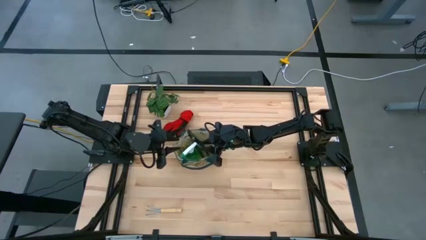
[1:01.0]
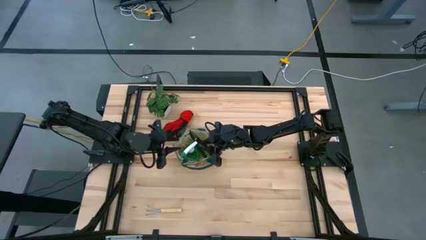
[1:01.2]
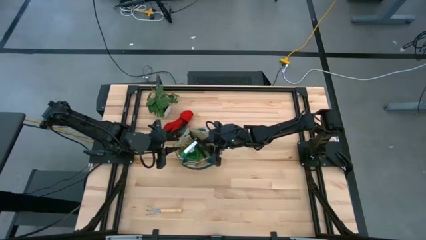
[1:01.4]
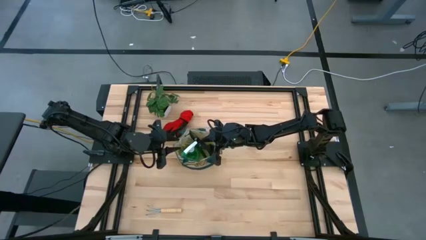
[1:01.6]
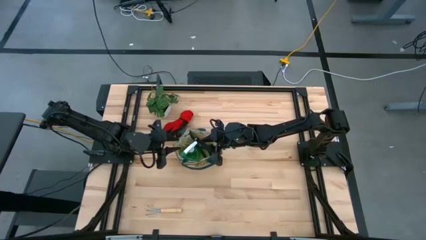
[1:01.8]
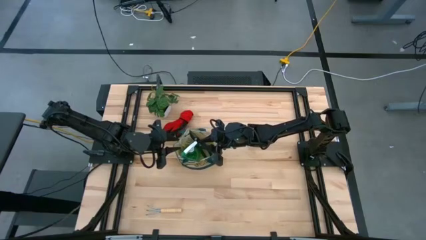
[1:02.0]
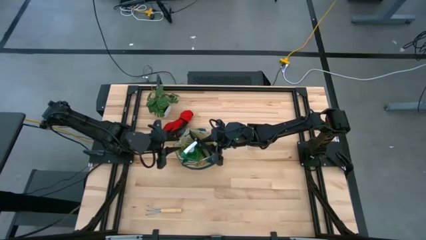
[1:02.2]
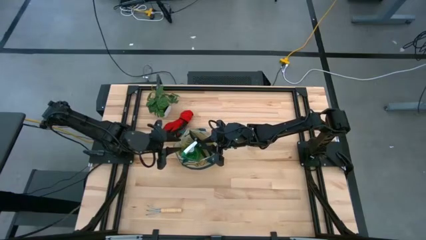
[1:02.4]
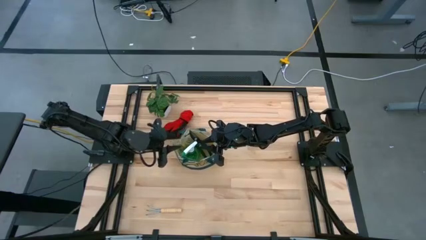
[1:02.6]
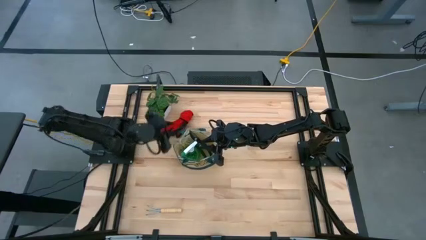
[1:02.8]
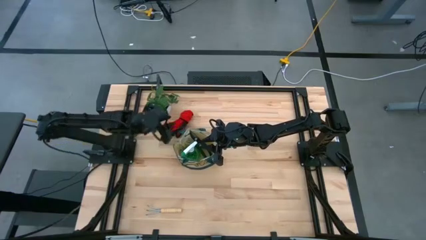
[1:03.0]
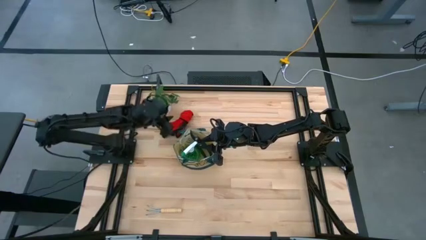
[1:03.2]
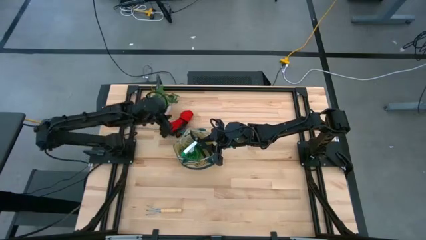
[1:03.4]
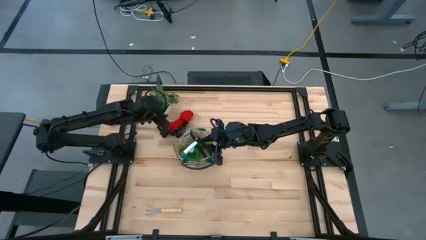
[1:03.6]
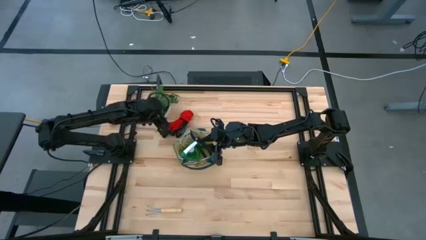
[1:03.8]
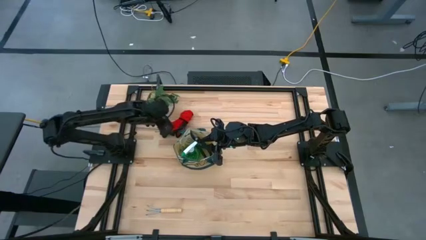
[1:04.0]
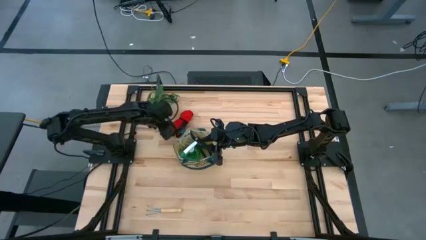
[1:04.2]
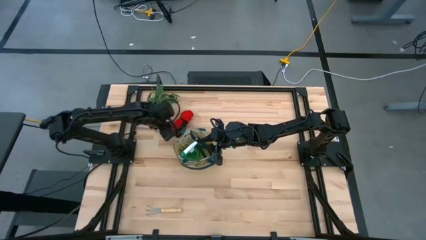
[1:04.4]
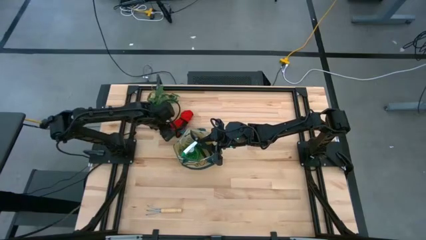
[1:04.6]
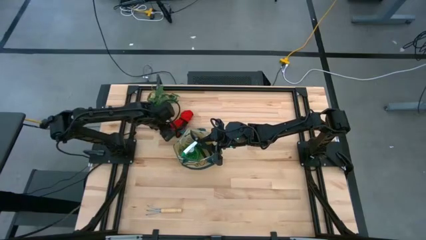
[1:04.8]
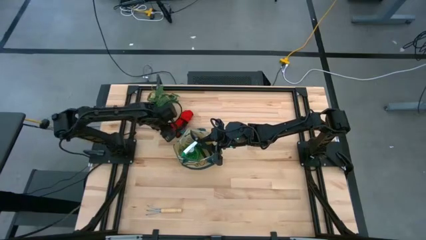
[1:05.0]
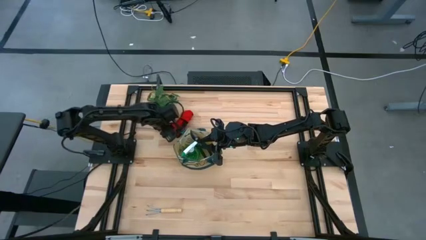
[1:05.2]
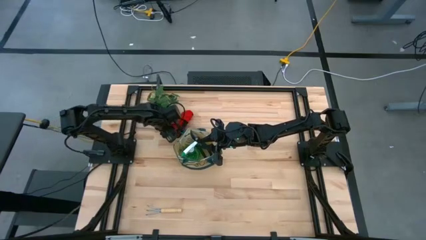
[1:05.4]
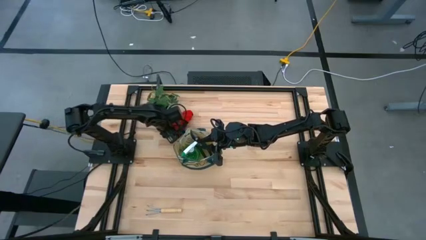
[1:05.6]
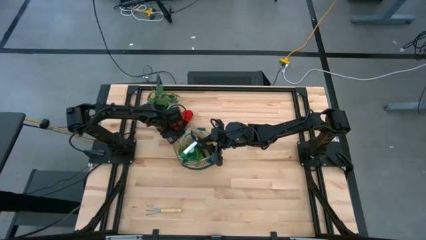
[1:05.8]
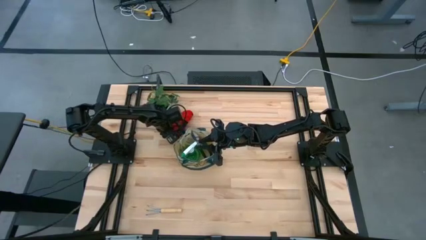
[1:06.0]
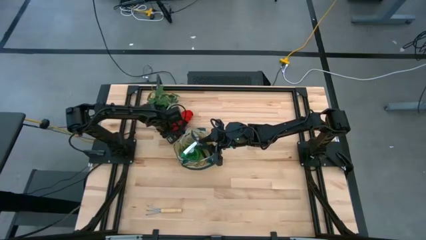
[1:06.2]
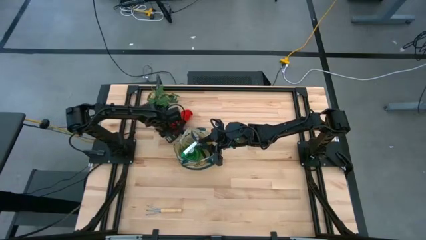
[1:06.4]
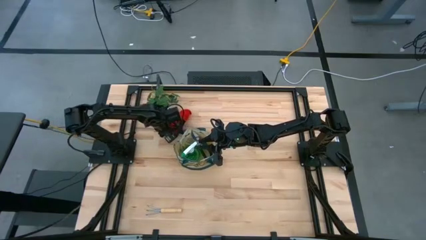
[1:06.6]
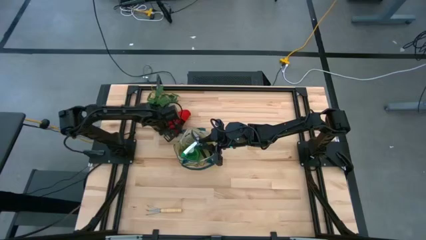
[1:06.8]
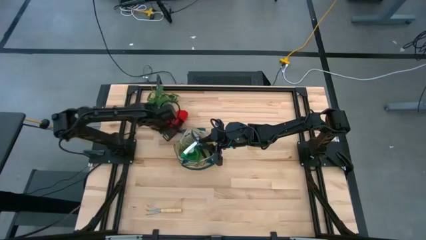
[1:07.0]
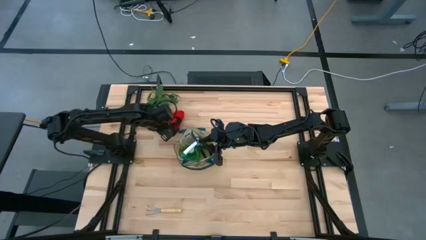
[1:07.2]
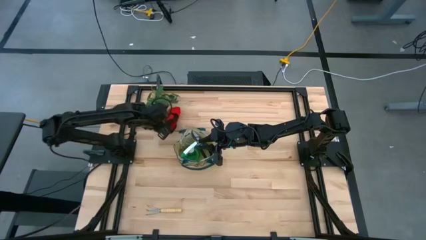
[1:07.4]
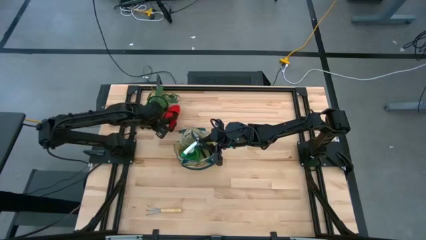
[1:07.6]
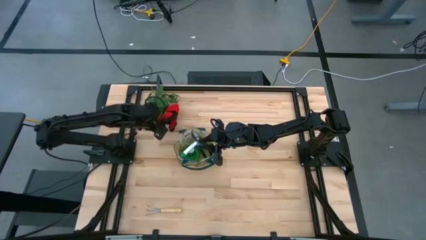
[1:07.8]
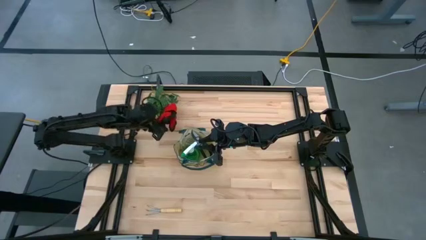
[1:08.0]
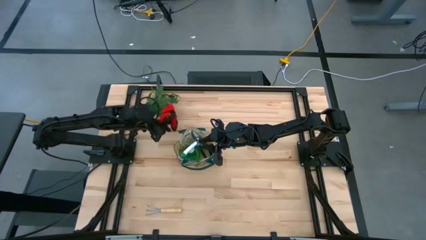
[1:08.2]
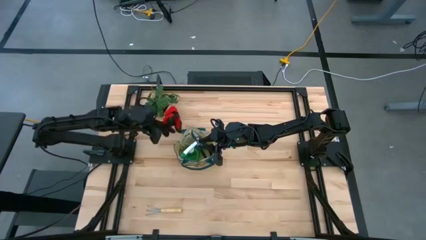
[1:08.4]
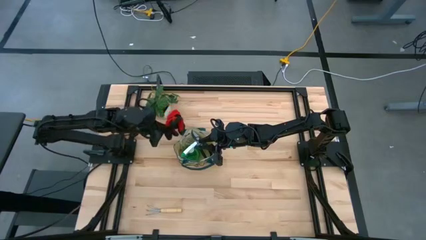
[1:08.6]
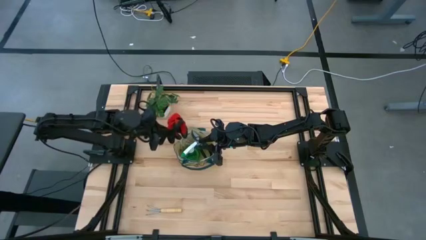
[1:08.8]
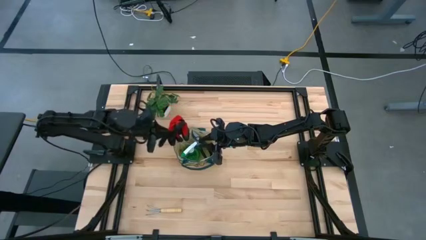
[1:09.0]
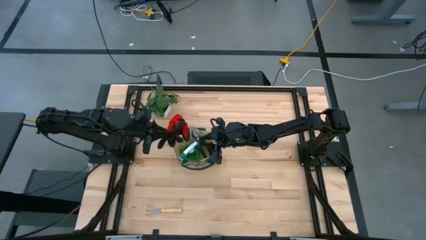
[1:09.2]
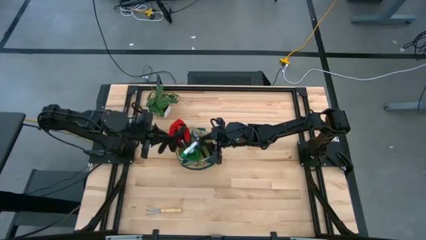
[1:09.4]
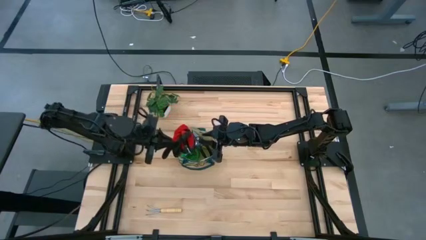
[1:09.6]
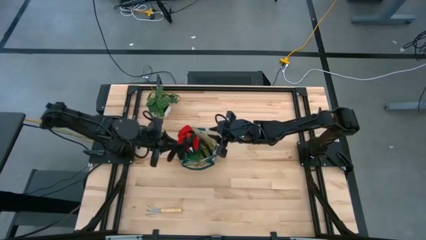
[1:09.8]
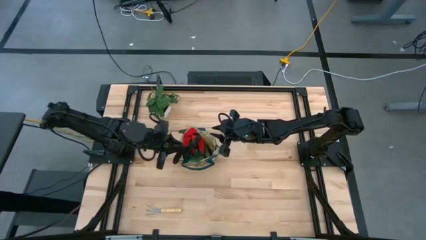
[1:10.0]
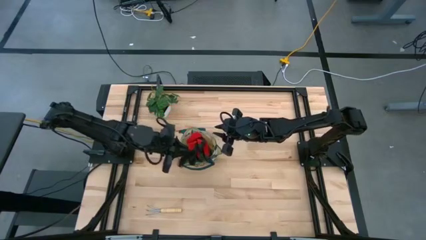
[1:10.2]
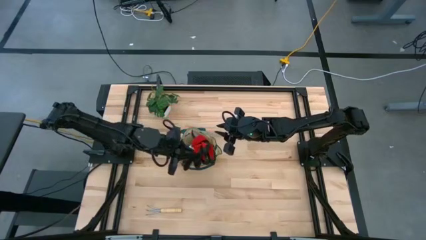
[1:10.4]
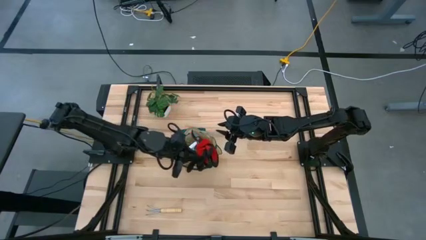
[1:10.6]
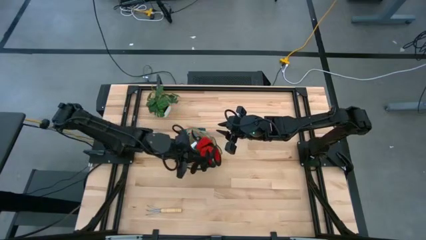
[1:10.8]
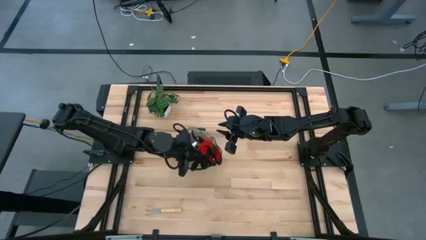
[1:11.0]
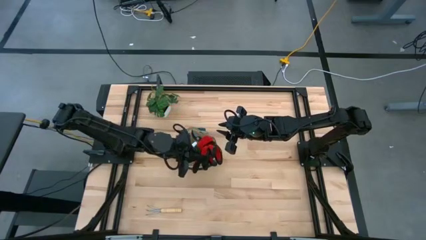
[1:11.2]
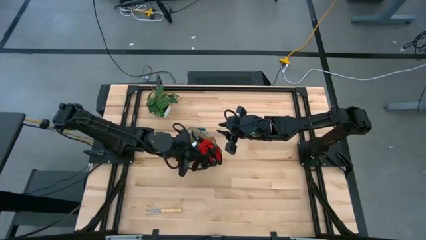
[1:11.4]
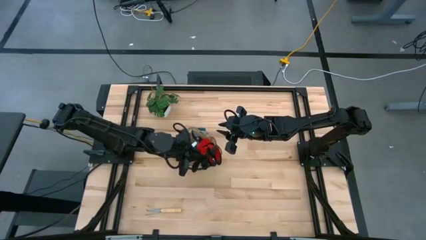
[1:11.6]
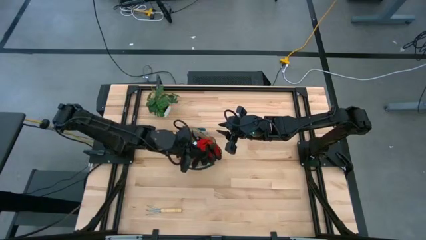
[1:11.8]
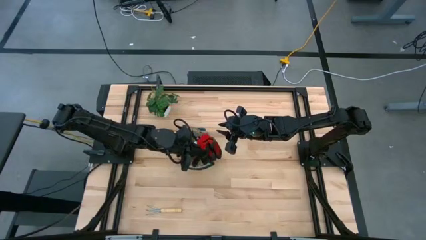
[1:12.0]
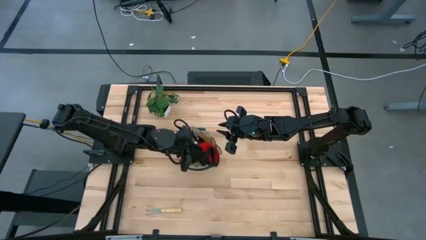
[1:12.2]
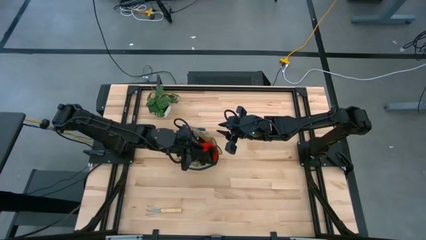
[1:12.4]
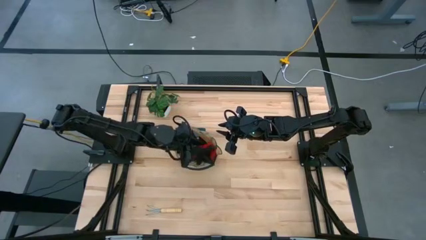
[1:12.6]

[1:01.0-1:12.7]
Task: Pick & Place Garden tools in Gardening bag
Put the gloves into the gardening bag
